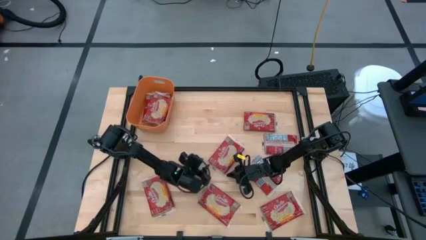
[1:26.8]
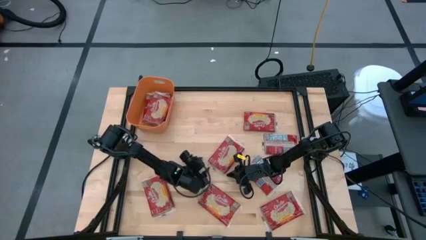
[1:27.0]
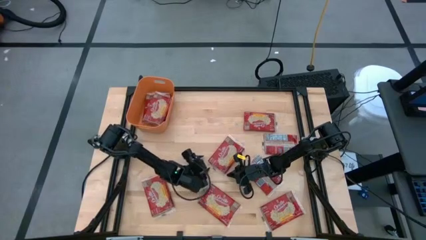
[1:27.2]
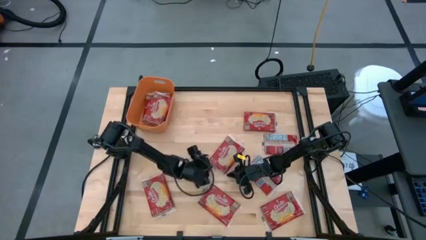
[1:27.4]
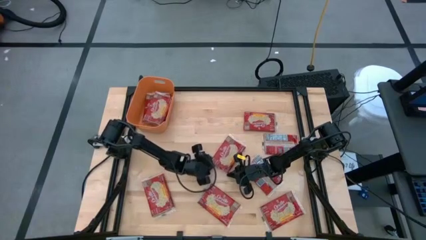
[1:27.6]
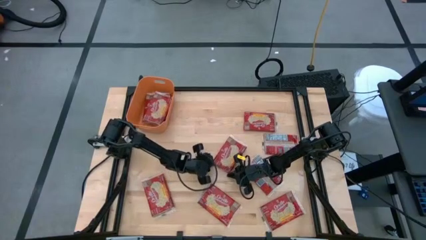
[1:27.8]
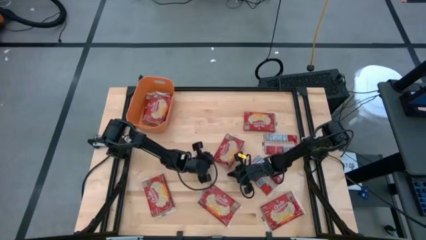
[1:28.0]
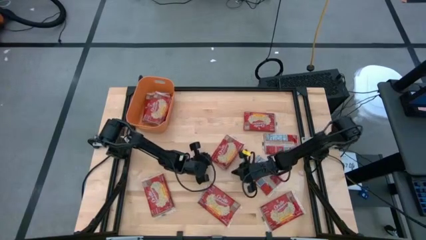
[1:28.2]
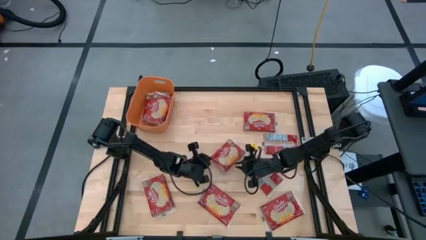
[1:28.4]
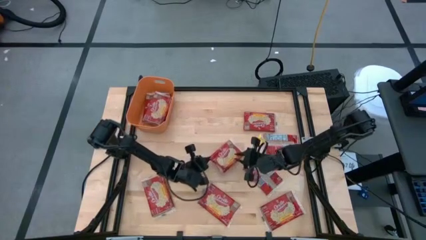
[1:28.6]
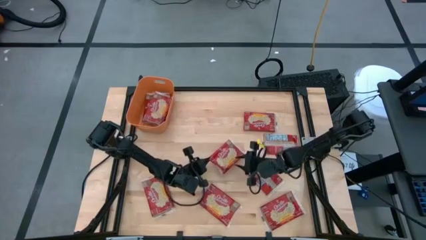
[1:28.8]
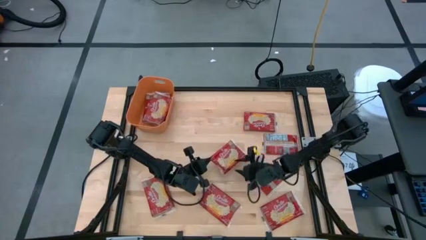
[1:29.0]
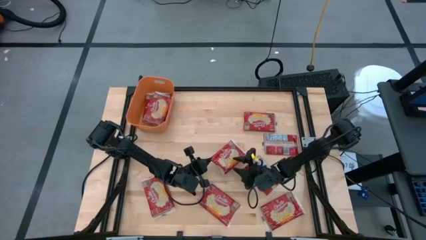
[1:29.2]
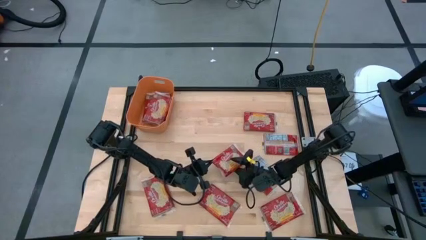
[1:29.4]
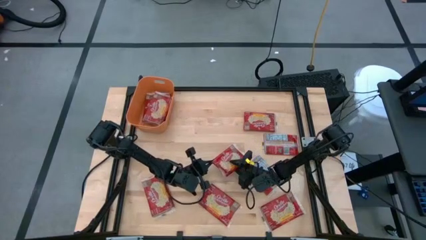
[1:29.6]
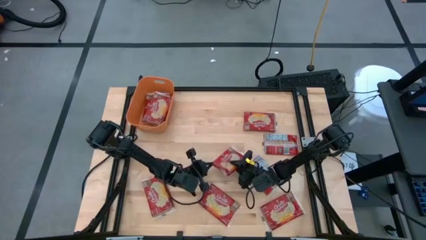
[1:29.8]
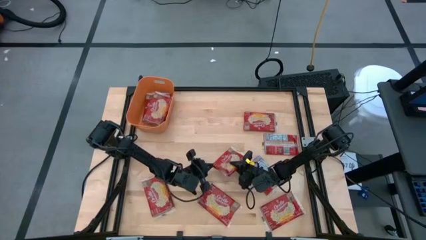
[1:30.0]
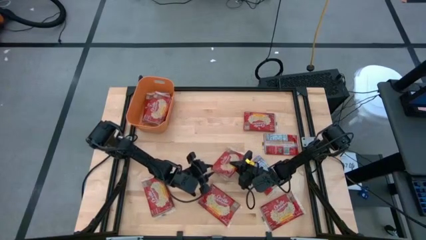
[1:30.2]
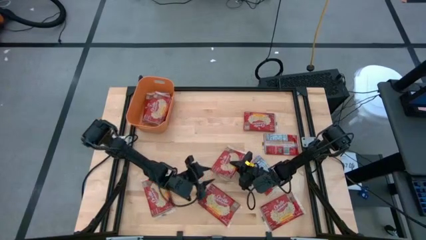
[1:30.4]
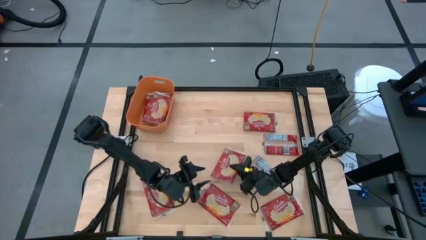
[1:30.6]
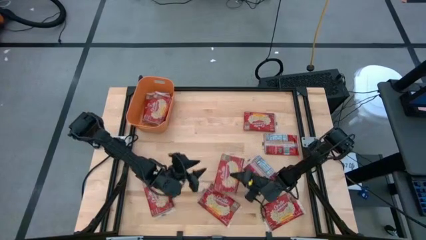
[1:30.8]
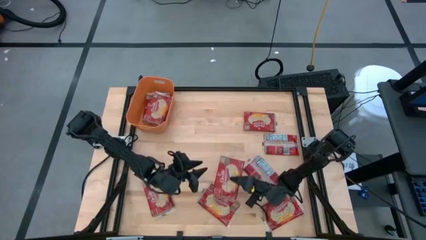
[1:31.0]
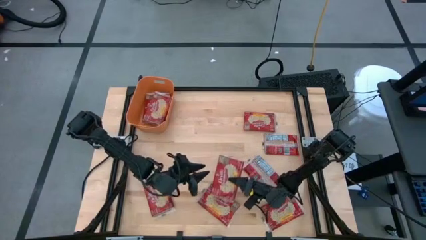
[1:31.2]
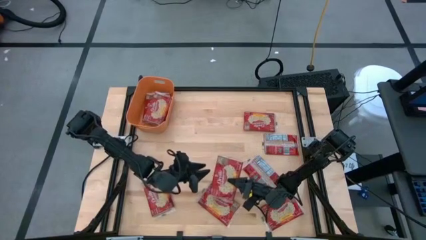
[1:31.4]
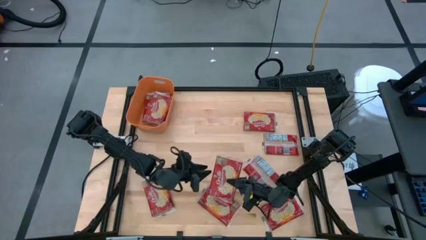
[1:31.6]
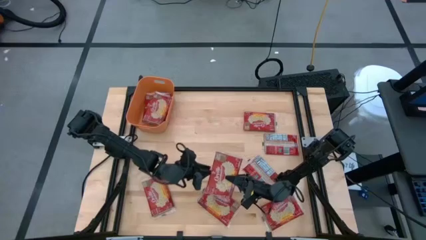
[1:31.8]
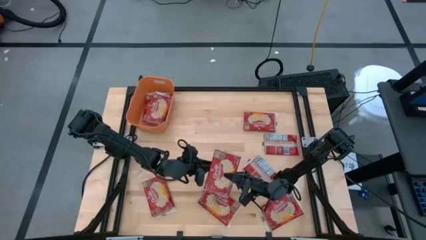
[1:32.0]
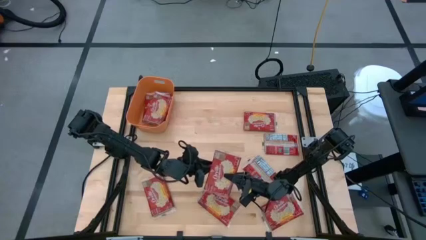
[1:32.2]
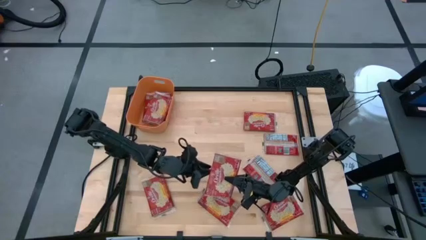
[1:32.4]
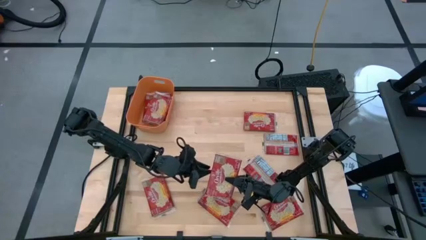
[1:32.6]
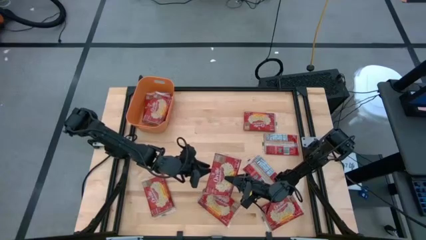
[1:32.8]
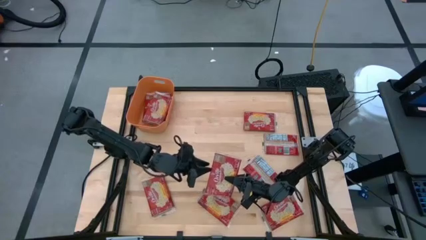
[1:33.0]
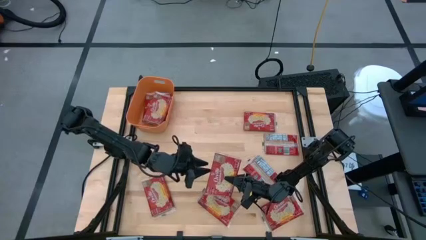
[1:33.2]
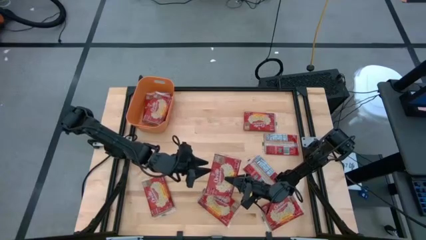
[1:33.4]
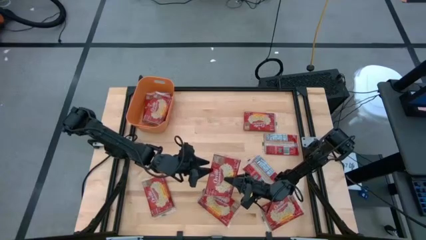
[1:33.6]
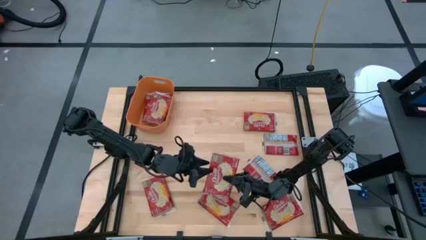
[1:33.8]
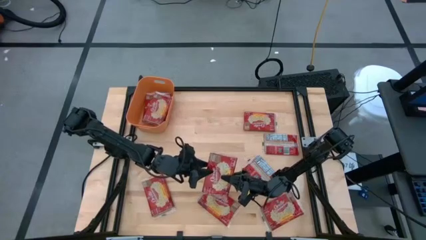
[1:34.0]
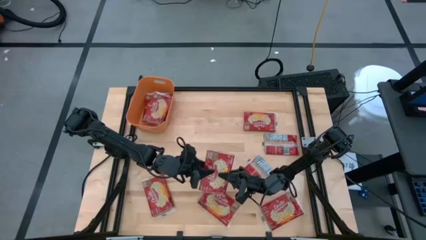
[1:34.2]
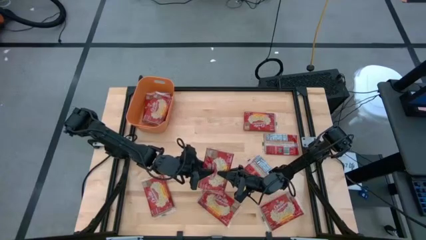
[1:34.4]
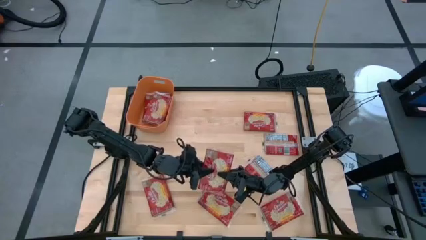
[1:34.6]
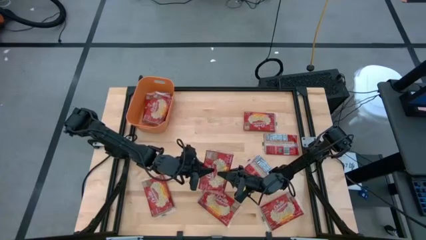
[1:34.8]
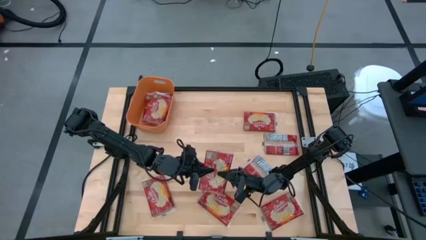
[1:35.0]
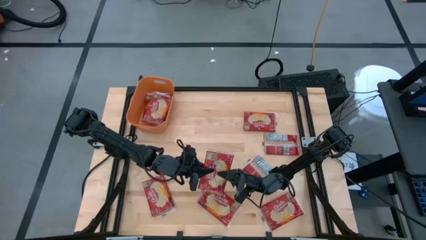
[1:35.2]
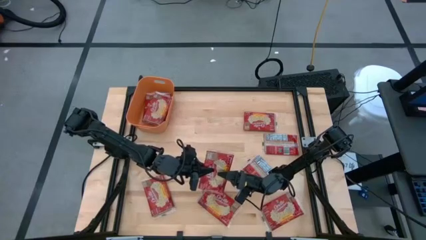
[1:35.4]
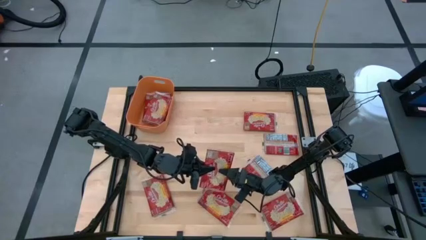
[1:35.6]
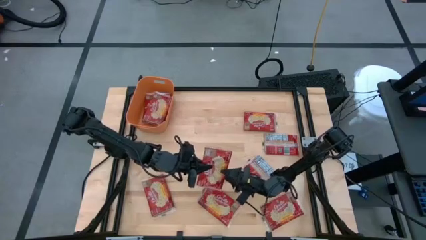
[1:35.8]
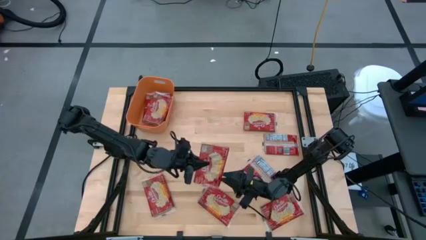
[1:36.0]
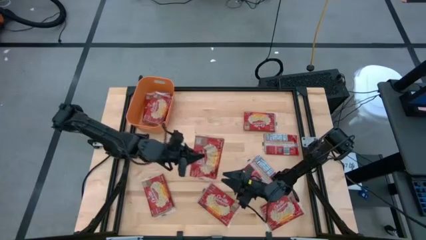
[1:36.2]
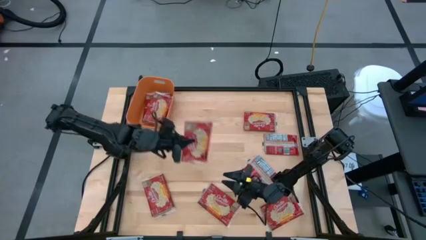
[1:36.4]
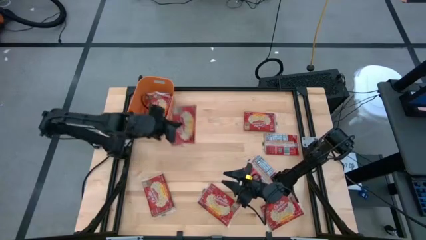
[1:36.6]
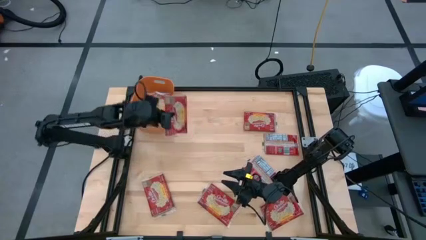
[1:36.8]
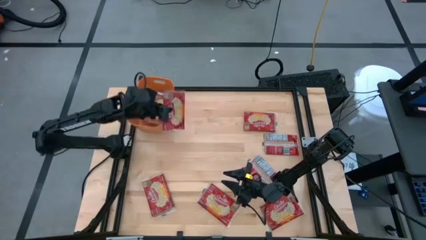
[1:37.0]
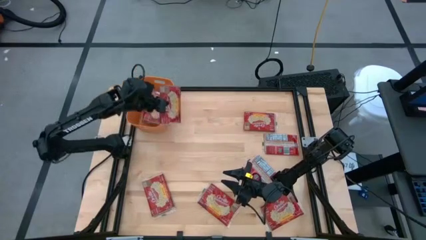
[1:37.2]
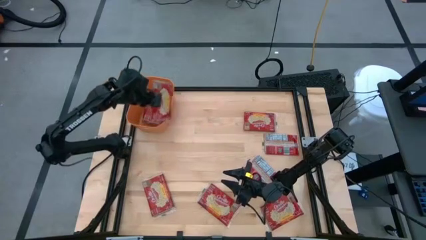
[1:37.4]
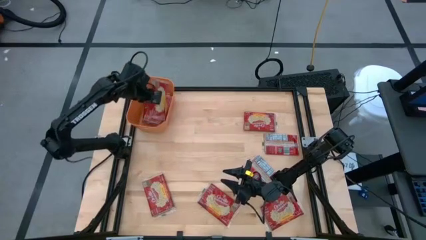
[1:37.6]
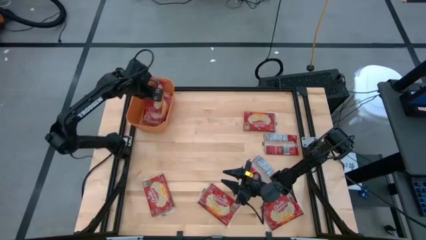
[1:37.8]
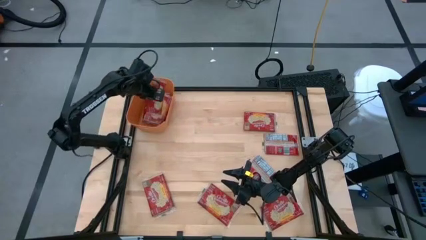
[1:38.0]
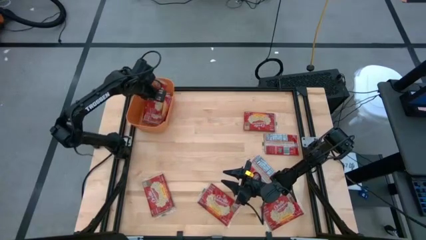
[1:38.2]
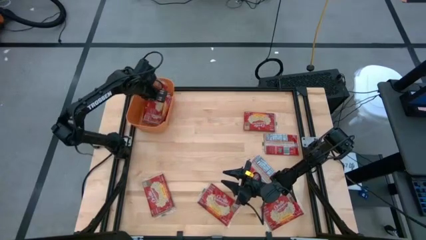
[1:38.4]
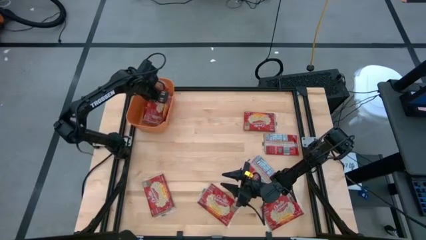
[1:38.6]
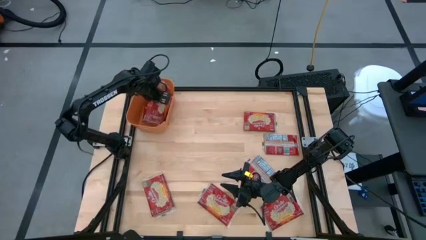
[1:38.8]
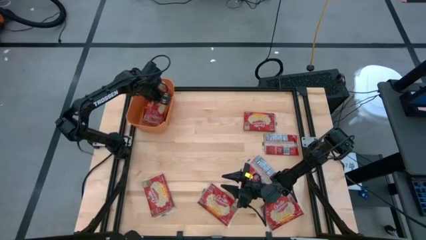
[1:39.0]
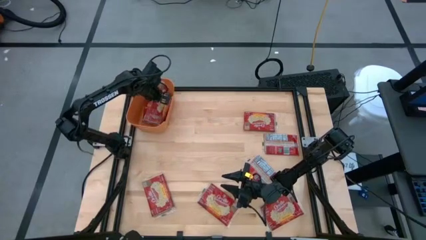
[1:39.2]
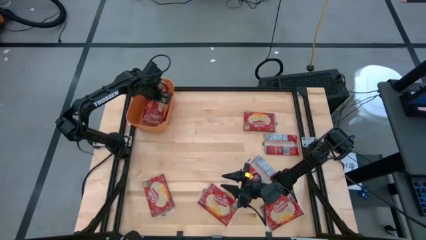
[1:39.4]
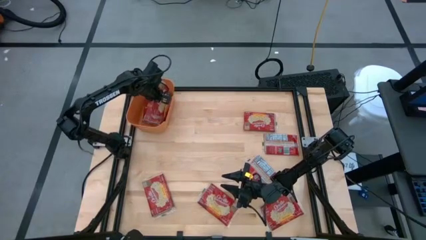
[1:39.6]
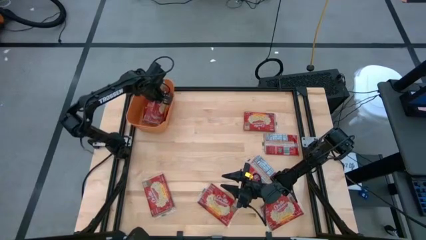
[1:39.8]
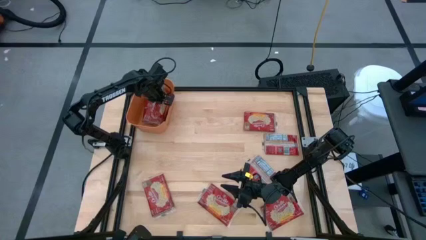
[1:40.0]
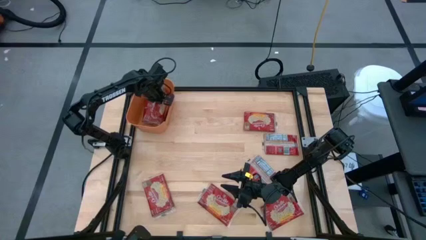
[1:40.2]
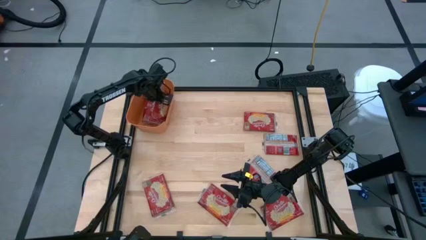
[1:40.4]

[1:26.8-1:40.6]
Task: Sort popcorn bags into baskets
Put the red popcorn bag into the orange bin

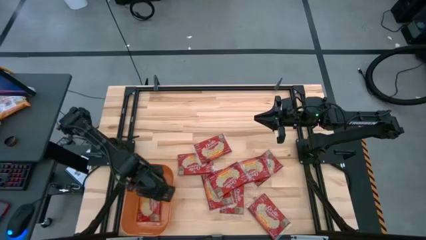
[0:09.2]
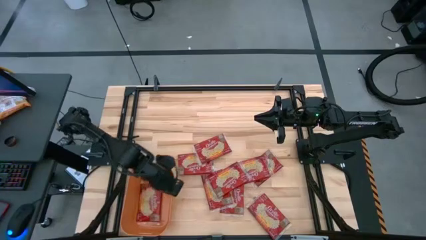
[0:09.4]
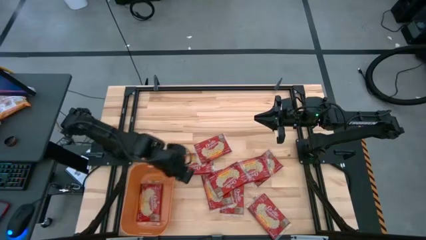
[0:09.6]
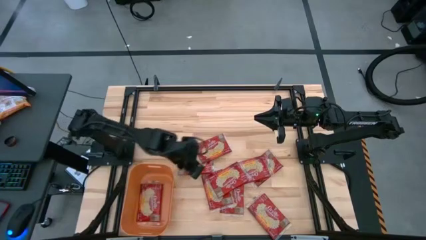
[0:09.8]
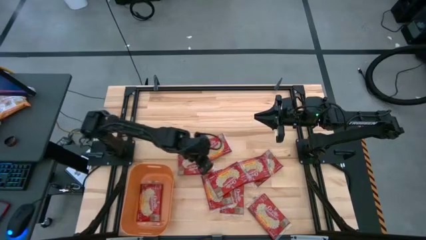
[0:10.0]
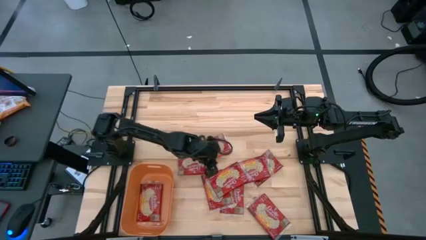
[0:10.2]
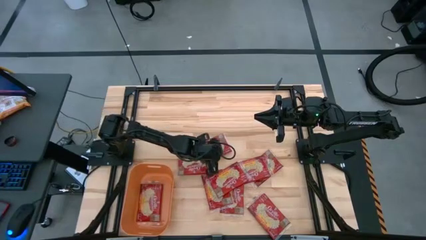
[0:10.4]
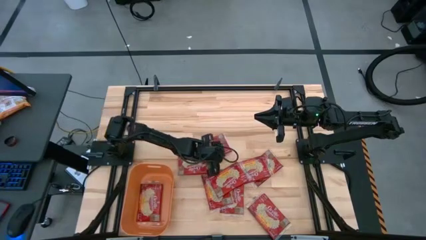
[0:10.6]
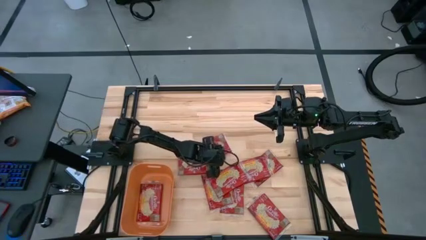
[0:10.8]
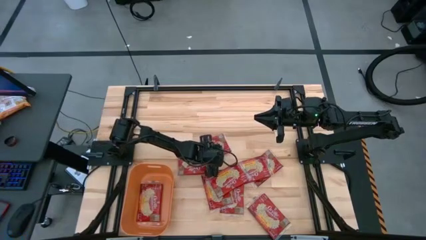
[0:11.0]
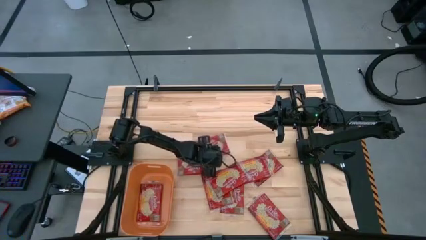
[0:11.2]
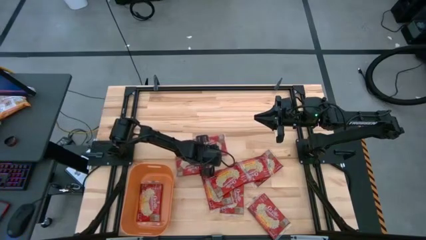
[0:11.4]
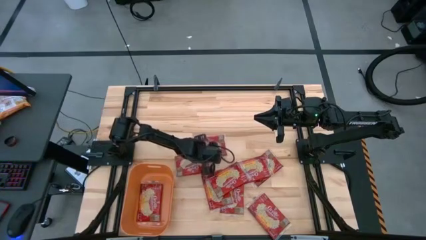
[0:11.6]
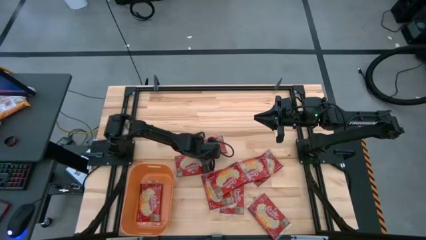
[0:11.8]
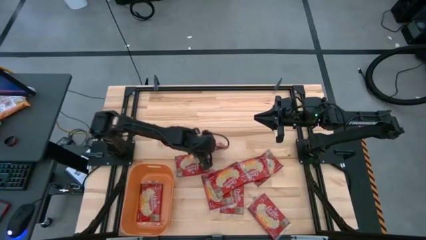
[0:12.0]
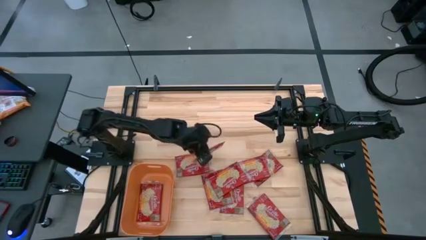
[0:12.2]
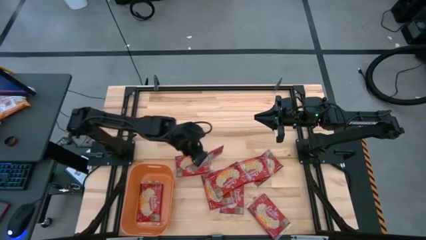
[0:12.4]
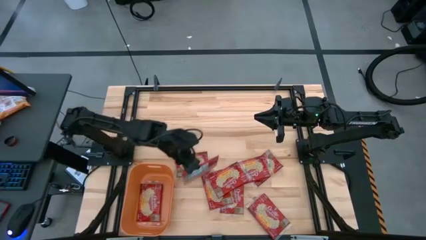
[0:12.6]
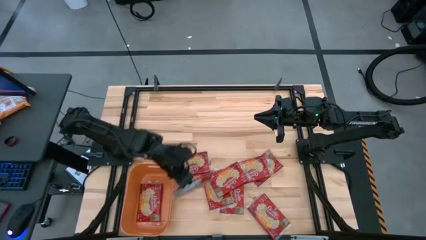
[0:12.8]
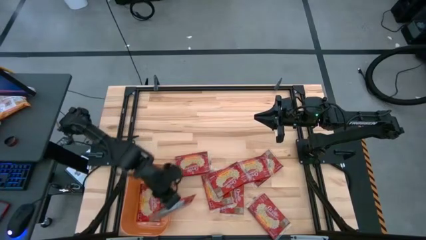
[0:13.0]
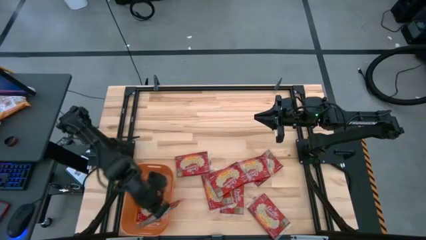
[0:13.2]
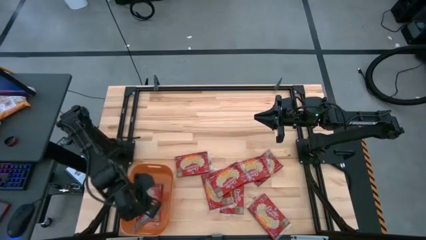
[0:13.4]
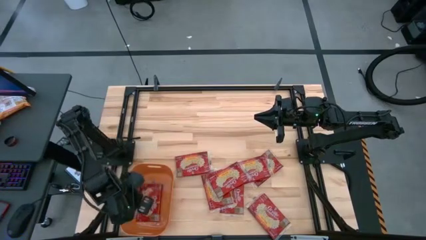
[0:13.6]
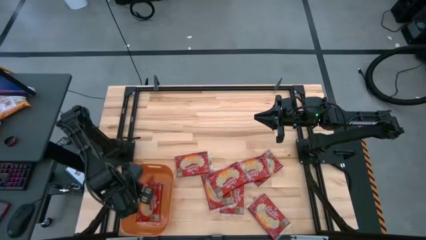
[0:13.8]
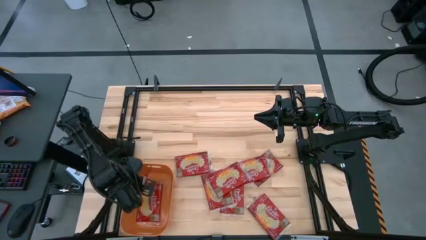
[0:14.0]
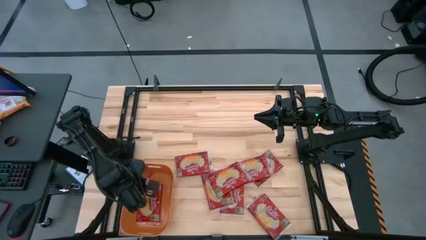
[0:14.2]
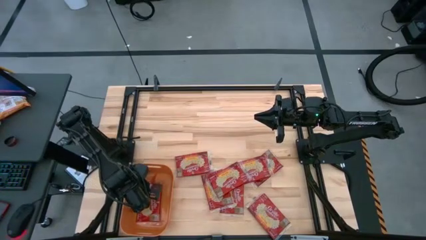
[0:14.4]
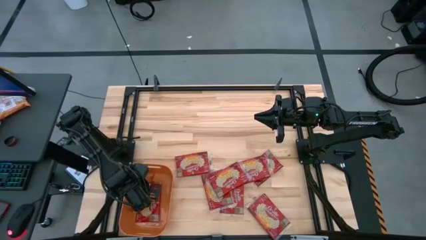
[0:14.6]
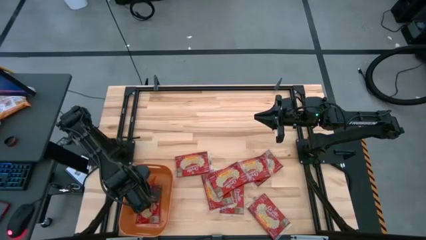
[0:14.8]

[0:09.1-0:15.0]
Task: Sort popcorn bags into baskets
Put the red popcorn bag into the orange container
